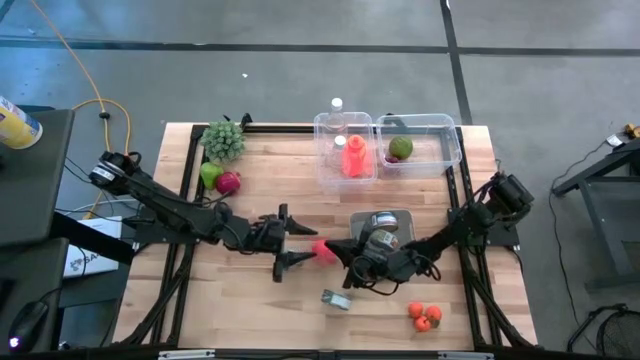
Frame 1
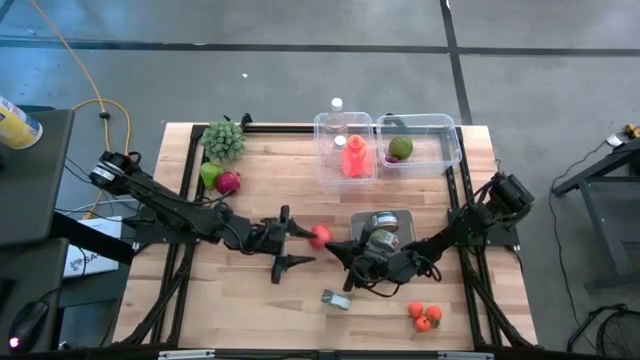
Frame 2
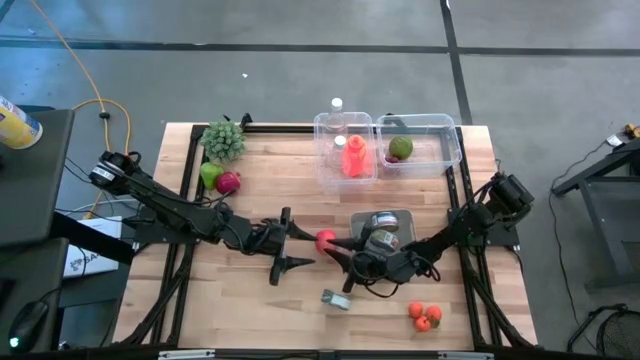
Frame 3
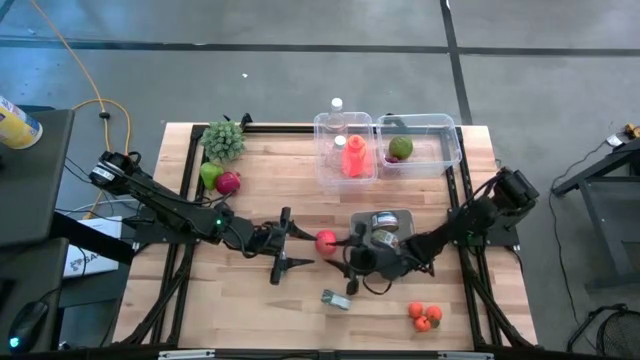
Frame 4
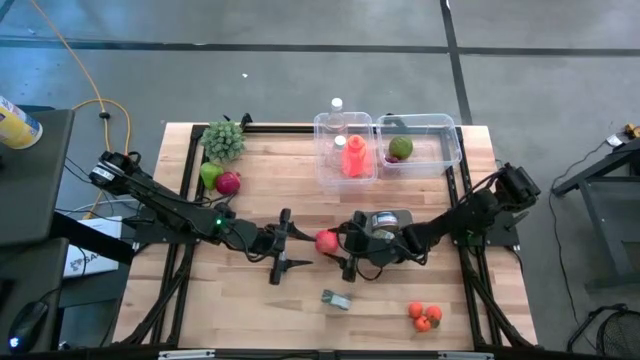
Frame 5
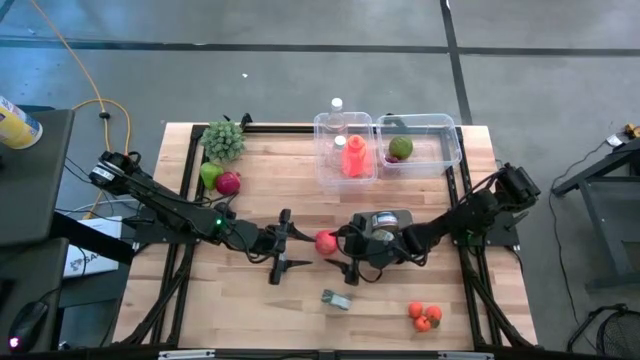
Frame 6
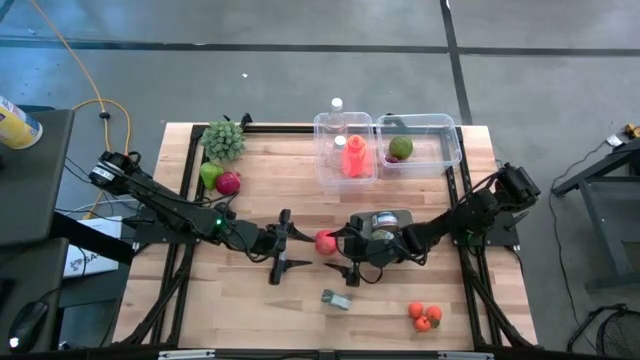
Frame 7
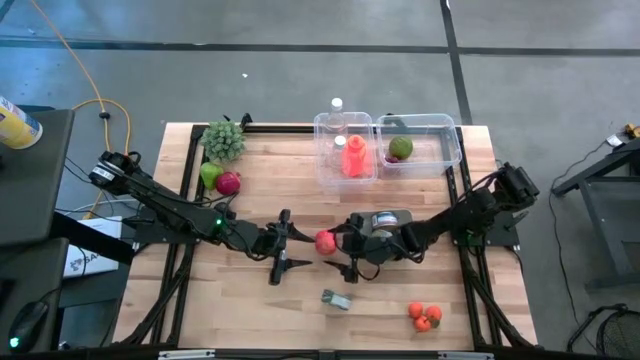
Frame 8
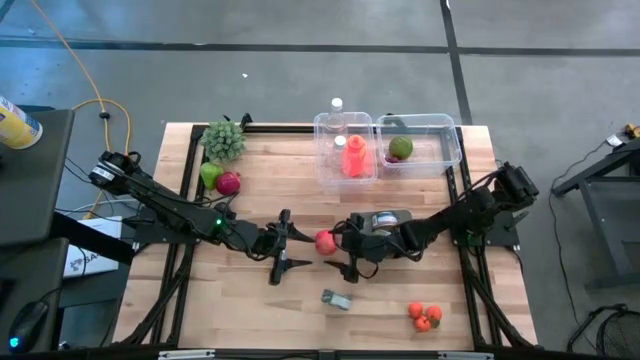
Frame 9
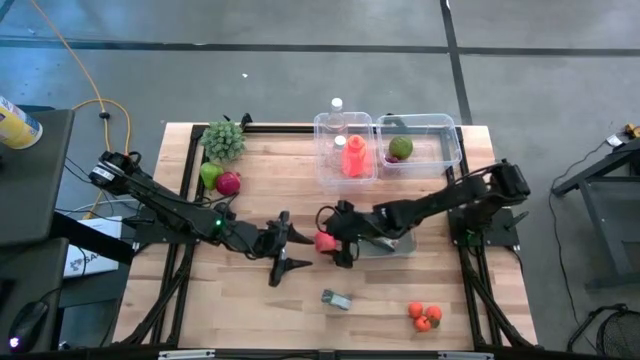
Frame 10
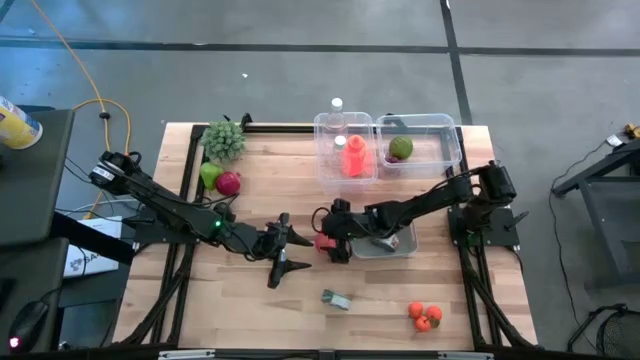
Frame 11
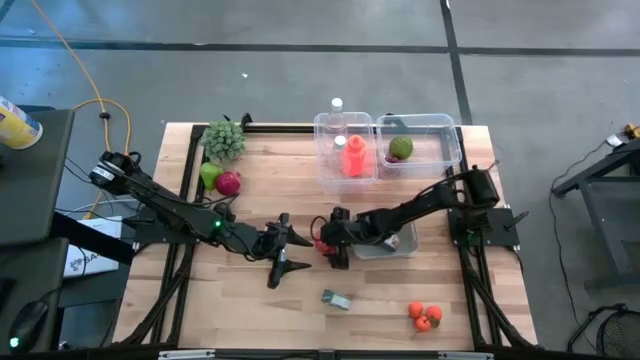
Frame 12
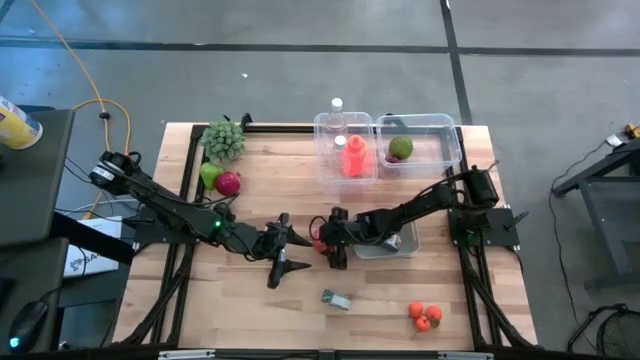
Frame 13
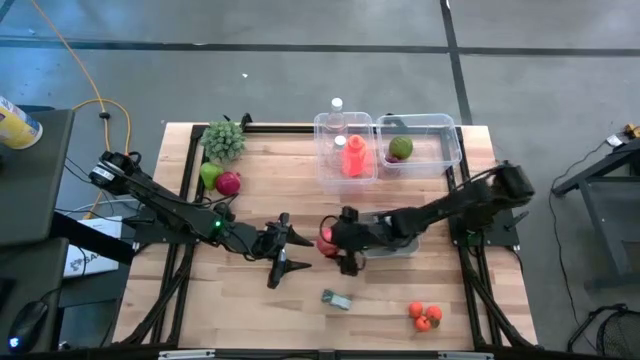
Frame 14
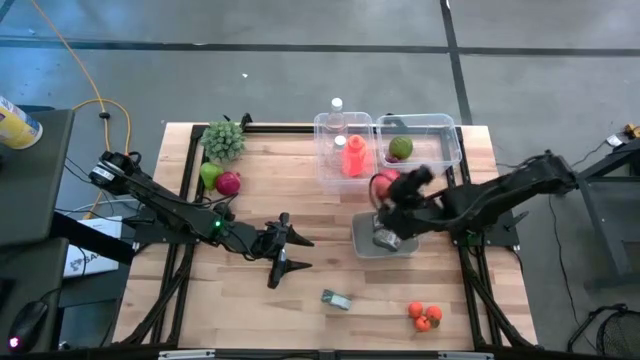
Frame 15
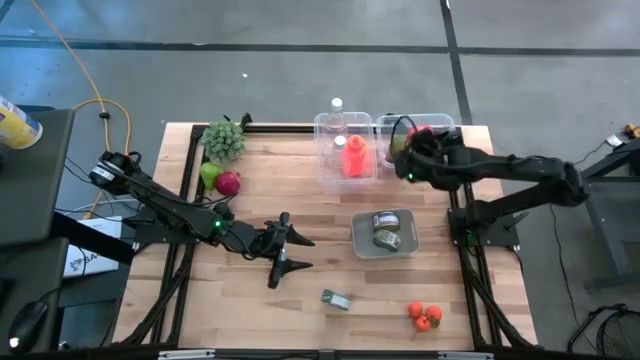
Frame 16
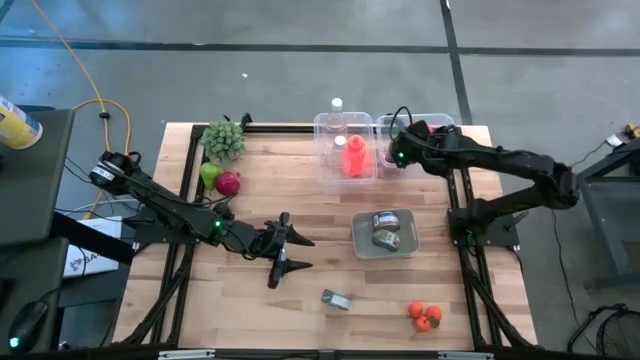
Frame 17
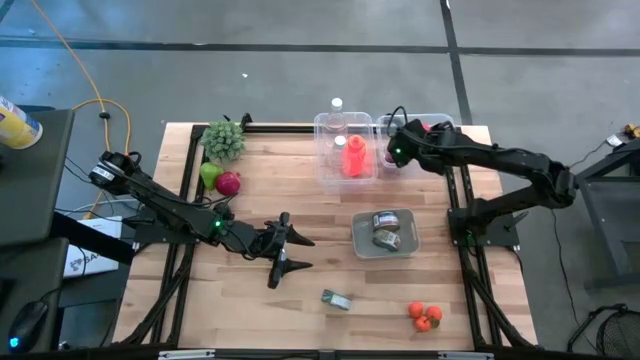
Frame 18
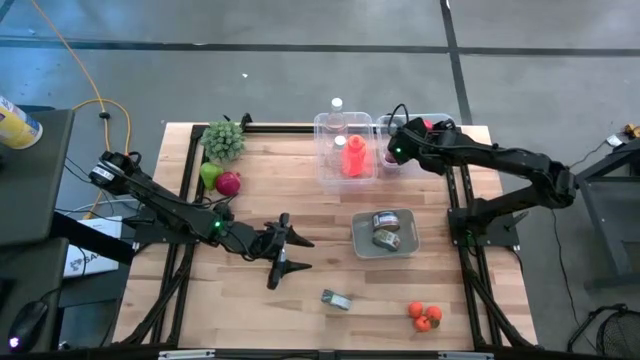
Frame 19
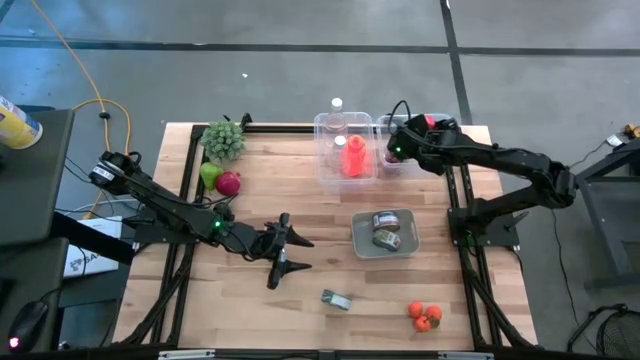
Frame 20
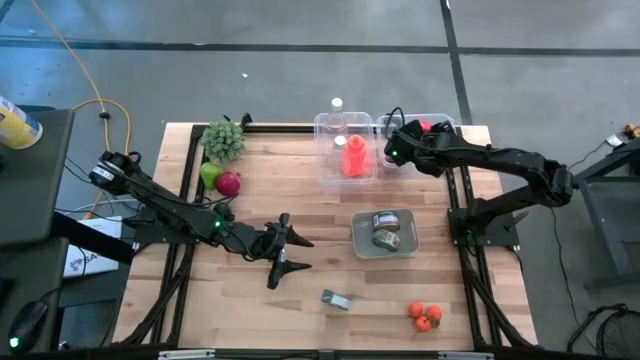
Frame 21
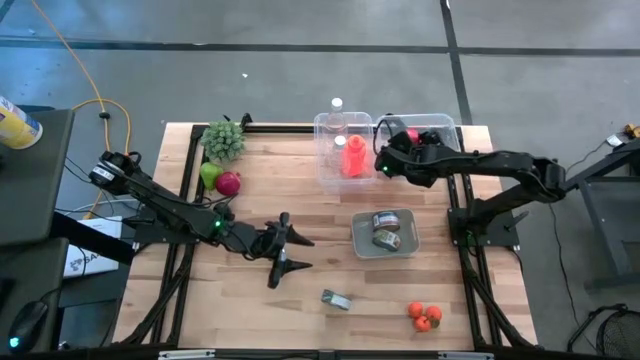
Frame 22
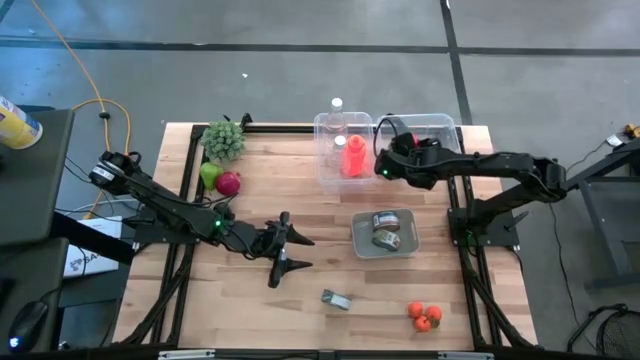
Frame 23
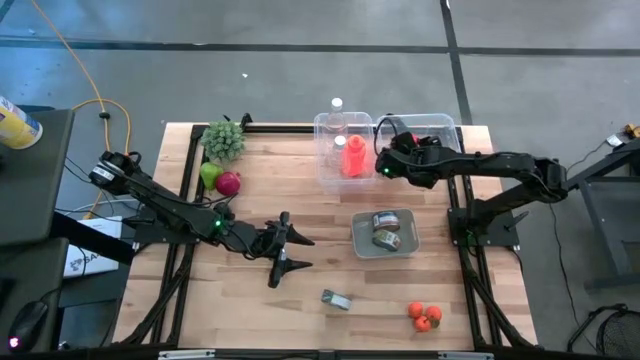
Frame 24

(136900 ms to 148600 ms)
Task: Pick & Place Food Item
Put the red apple into the right transparent bin

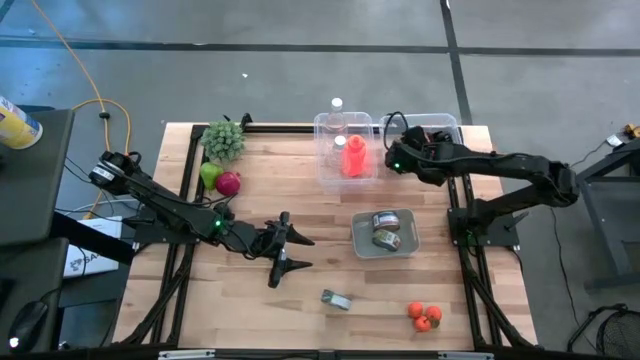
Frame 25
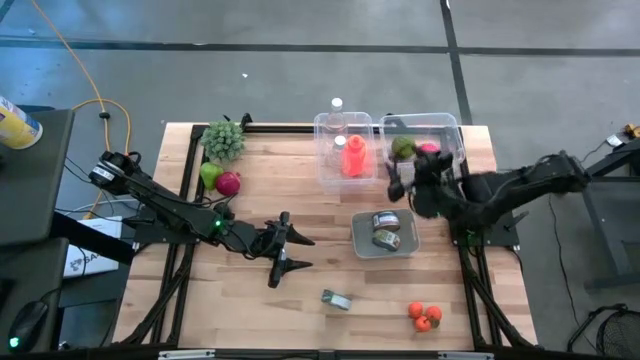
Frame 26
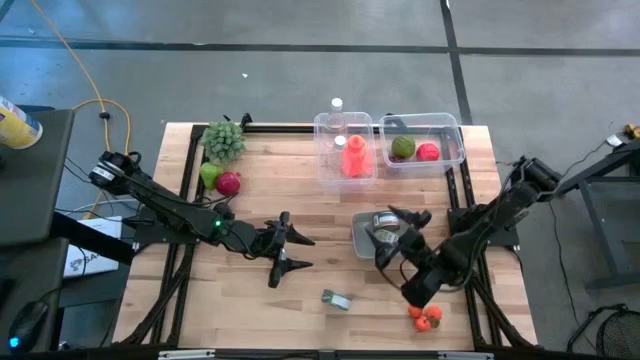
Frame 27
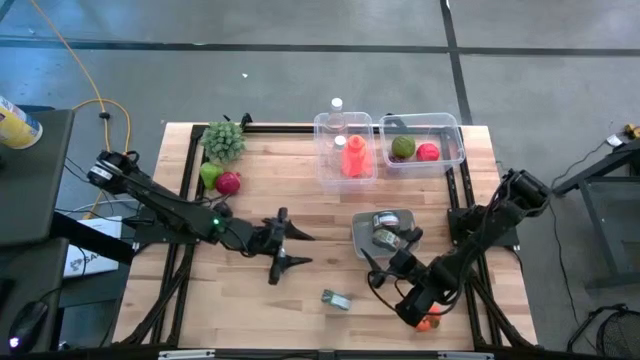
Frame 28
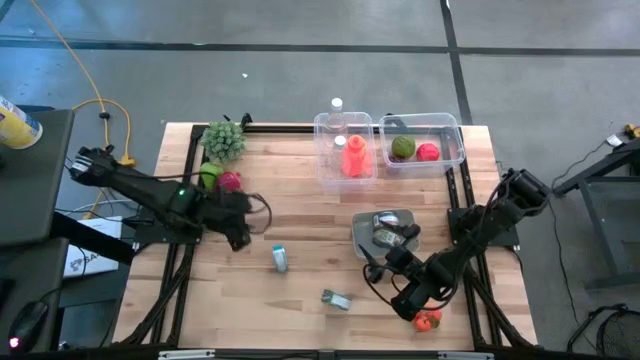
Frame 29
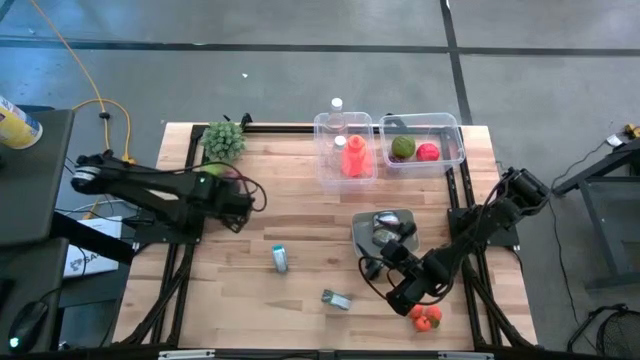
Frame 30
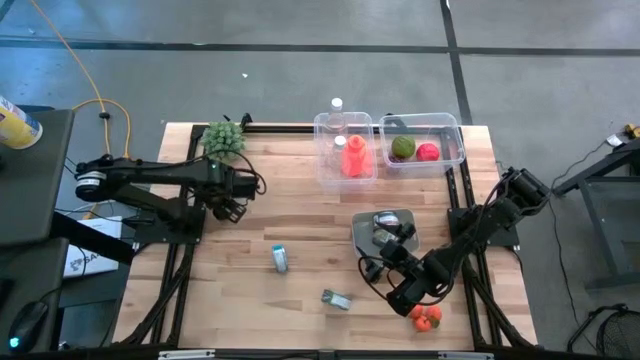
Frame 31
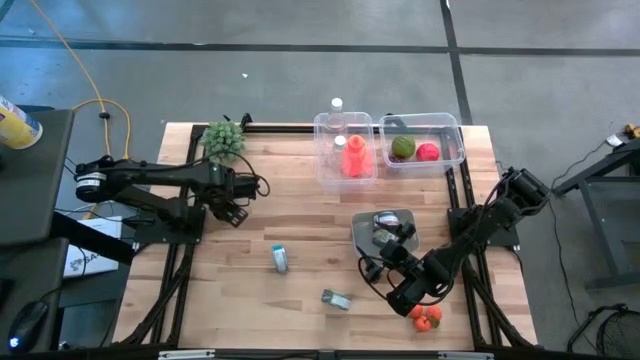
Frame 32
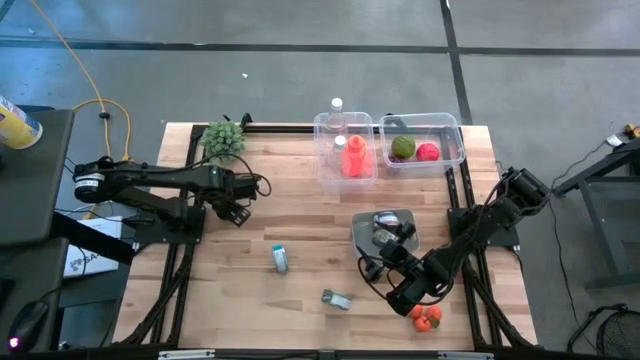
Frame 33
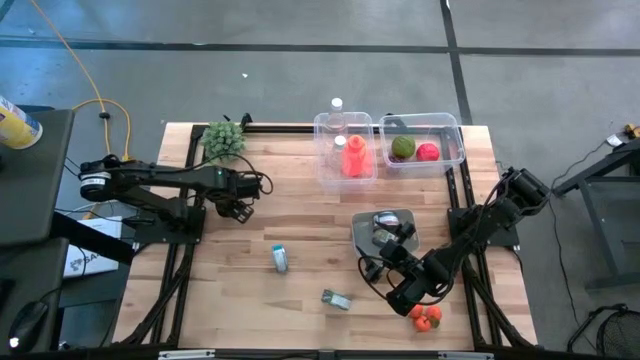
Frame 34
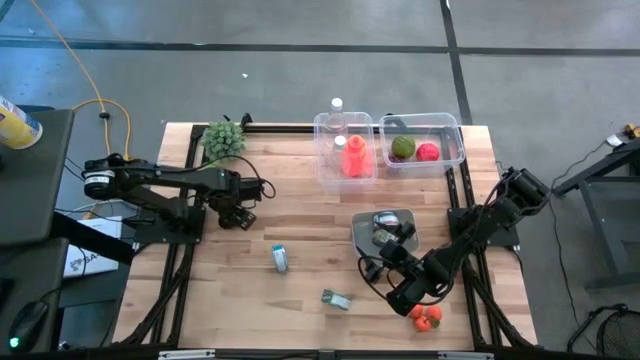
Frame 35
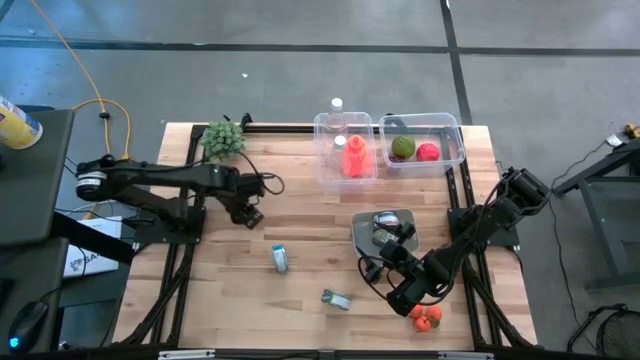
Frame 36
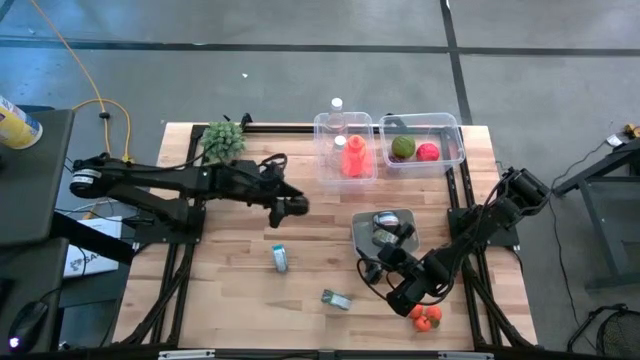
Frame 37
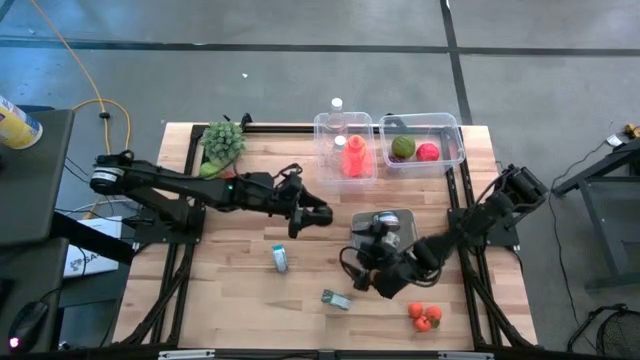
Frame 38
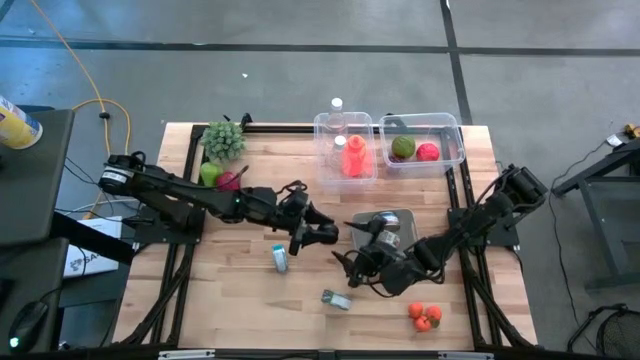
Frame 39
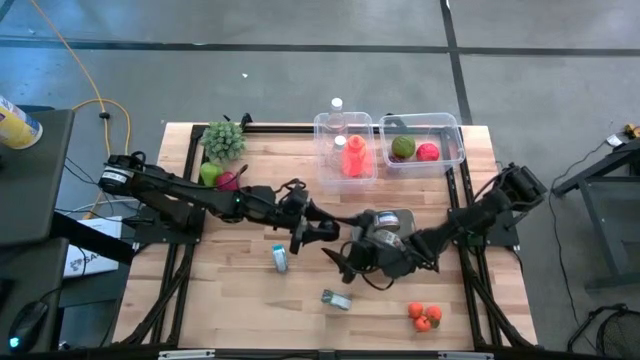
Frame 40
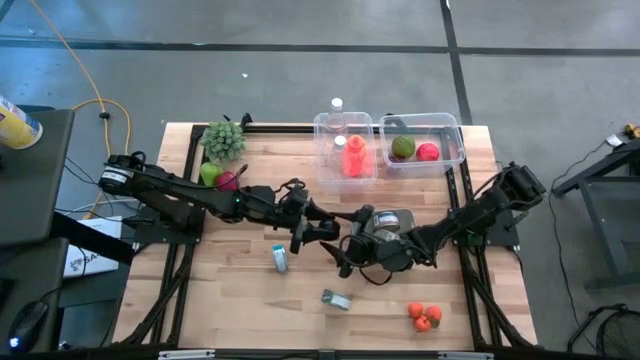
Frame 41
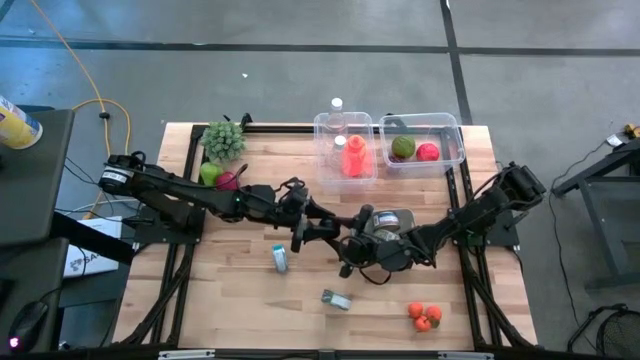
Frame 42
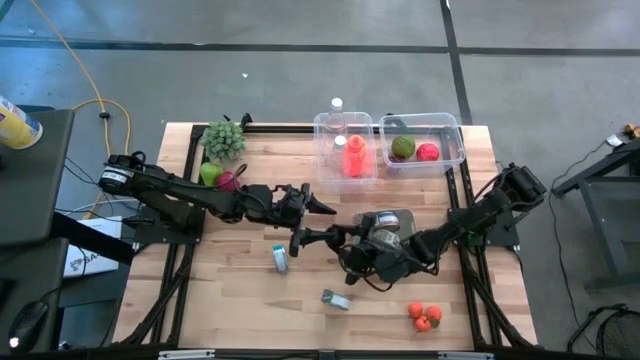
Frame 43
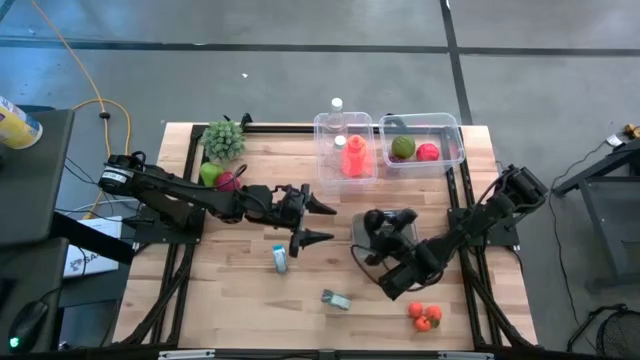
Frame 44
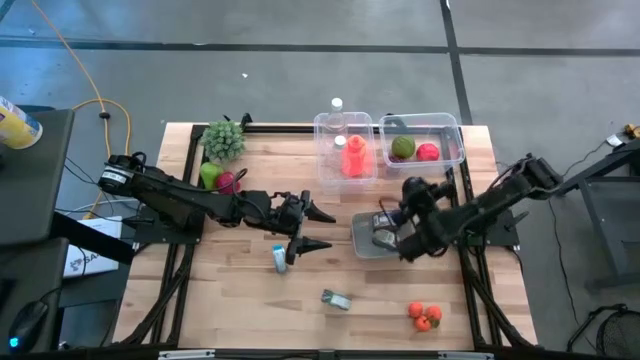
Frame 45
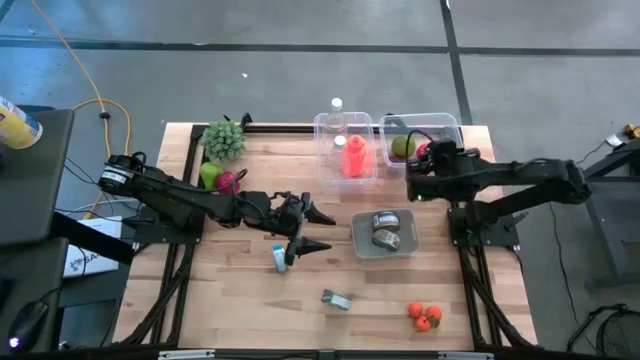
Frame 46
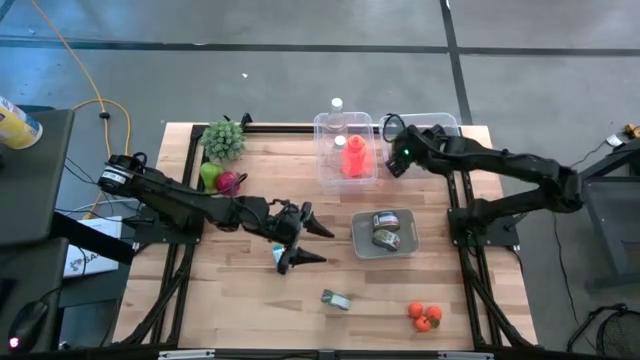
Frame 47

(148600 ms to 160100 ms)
Put the plum into the right transparent bin
